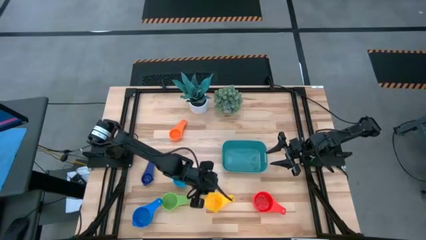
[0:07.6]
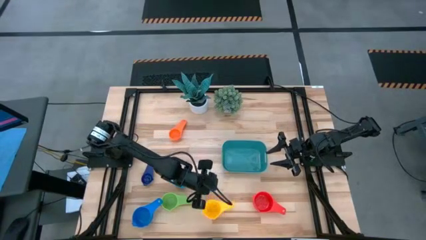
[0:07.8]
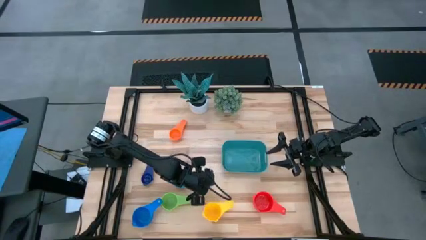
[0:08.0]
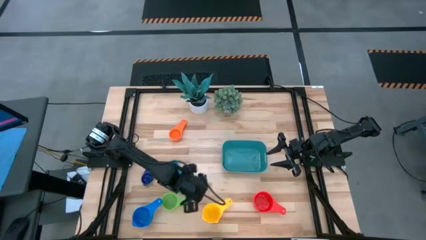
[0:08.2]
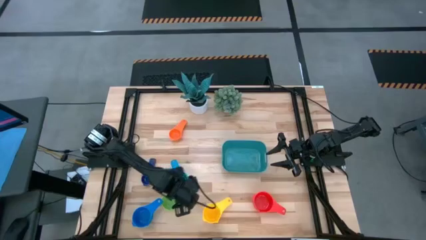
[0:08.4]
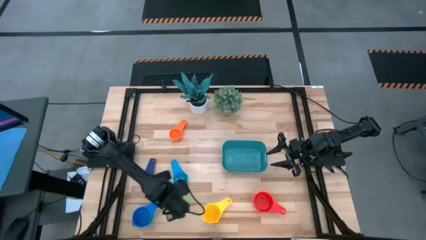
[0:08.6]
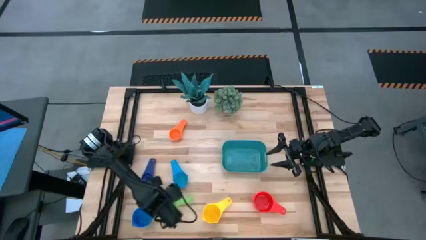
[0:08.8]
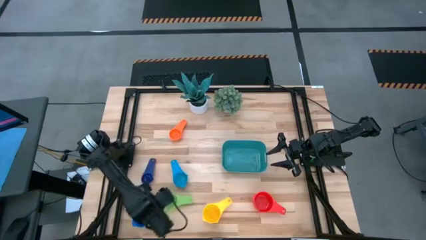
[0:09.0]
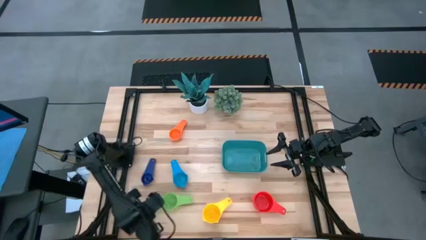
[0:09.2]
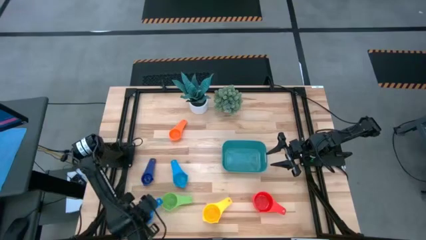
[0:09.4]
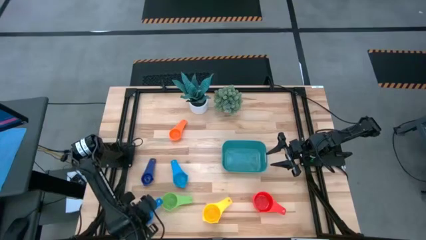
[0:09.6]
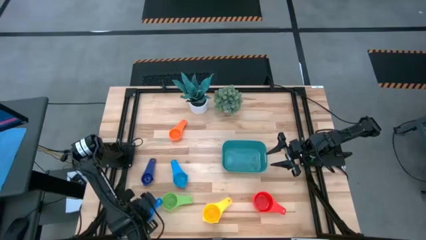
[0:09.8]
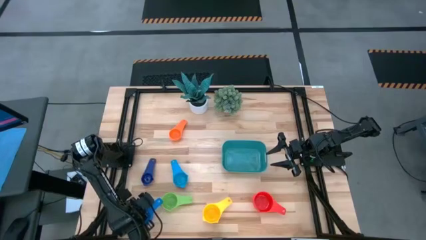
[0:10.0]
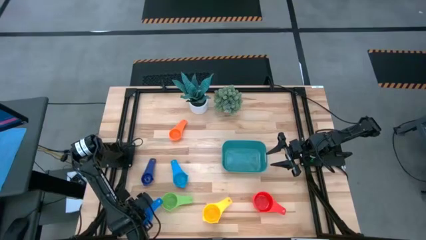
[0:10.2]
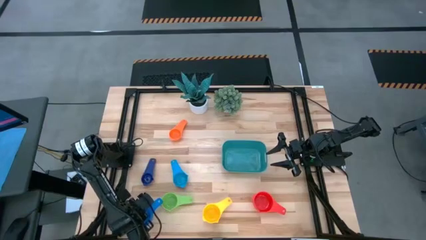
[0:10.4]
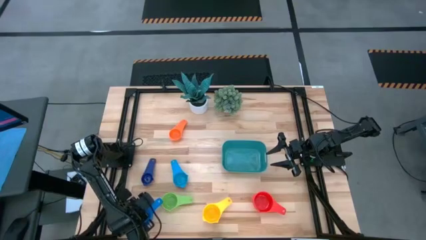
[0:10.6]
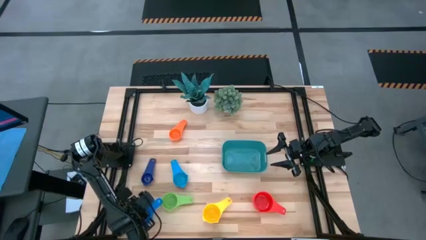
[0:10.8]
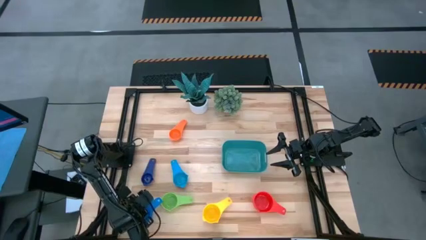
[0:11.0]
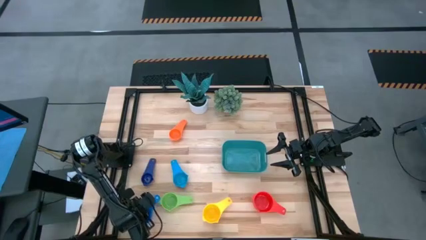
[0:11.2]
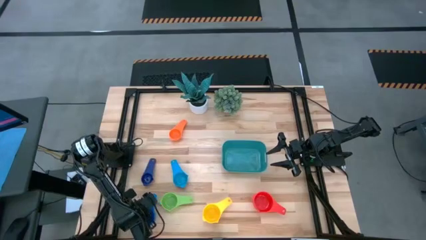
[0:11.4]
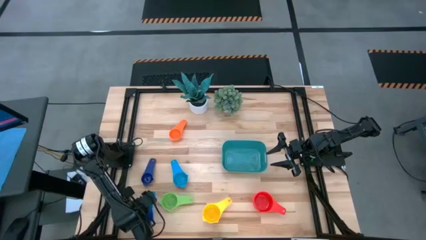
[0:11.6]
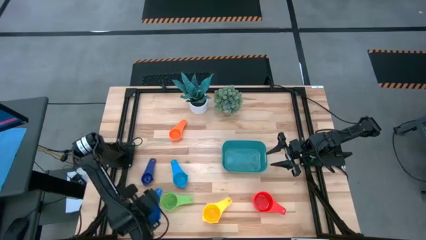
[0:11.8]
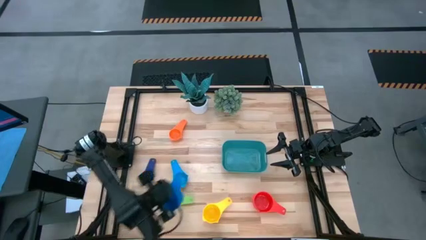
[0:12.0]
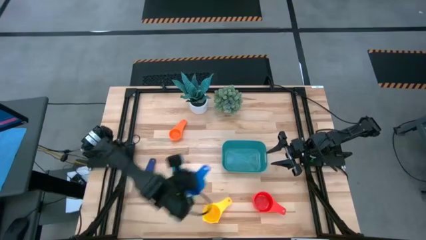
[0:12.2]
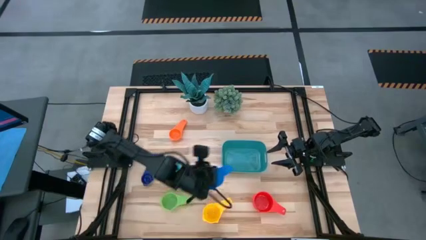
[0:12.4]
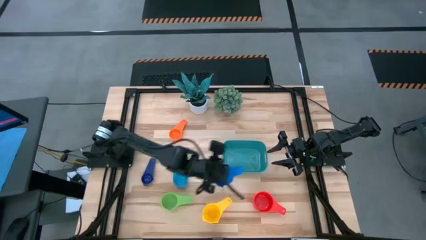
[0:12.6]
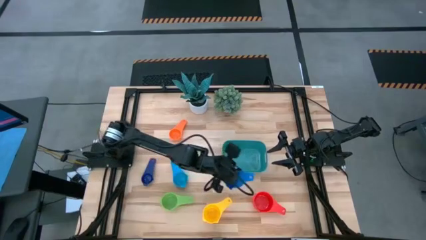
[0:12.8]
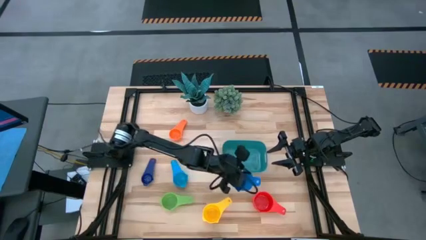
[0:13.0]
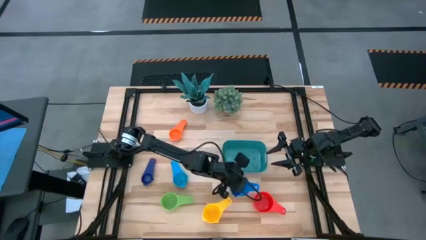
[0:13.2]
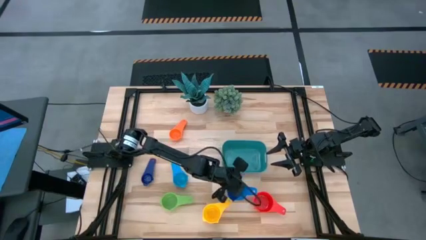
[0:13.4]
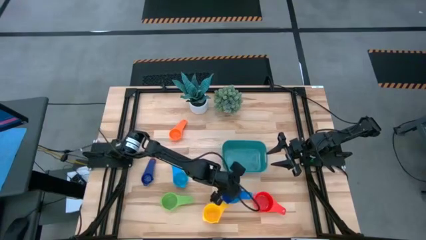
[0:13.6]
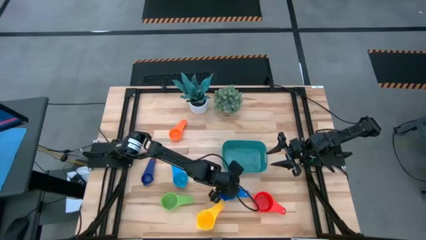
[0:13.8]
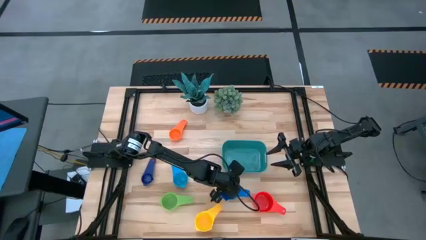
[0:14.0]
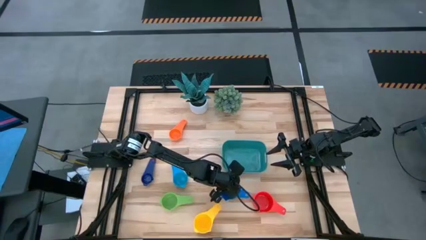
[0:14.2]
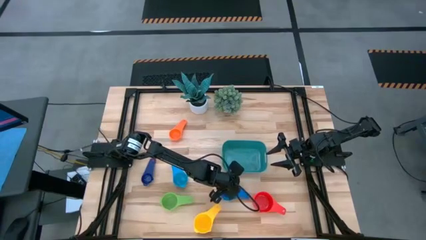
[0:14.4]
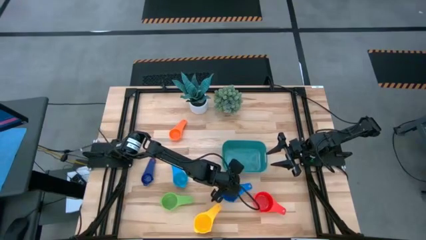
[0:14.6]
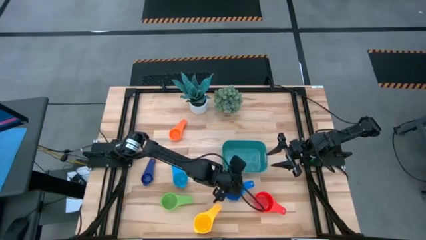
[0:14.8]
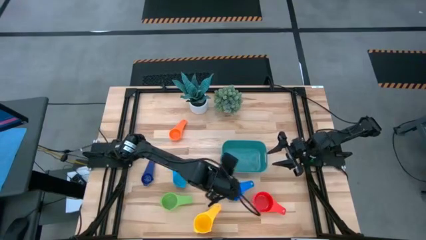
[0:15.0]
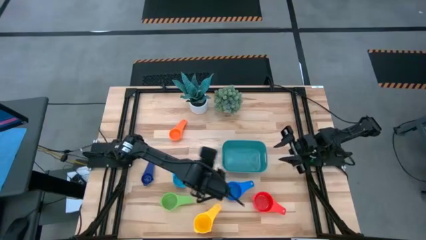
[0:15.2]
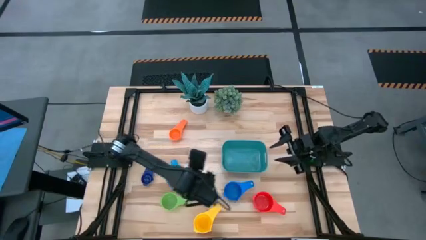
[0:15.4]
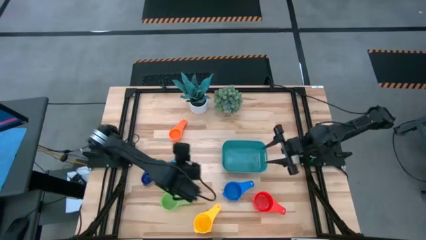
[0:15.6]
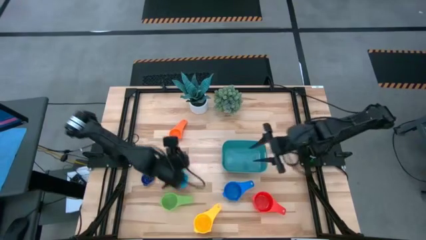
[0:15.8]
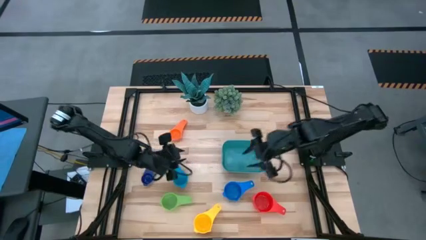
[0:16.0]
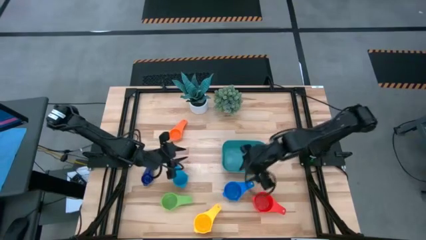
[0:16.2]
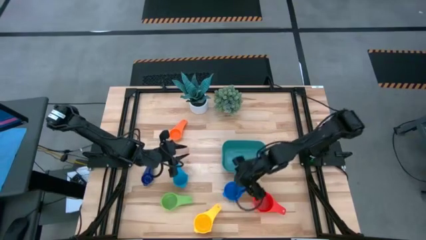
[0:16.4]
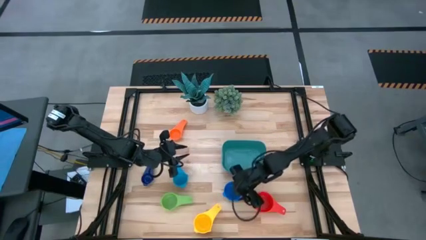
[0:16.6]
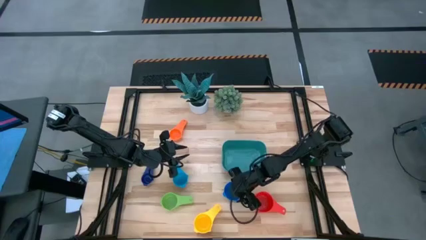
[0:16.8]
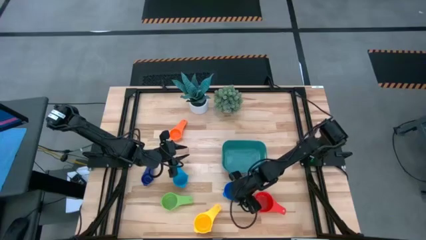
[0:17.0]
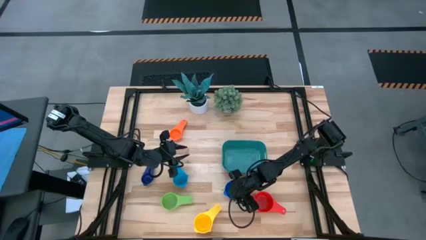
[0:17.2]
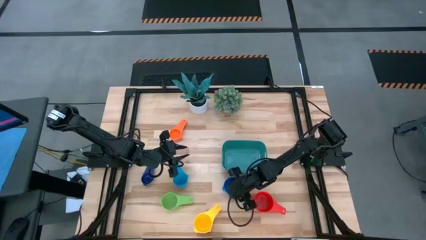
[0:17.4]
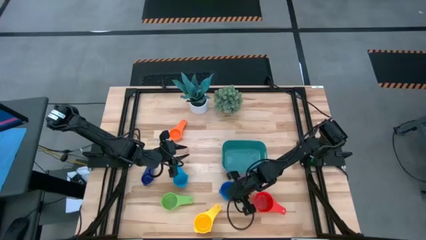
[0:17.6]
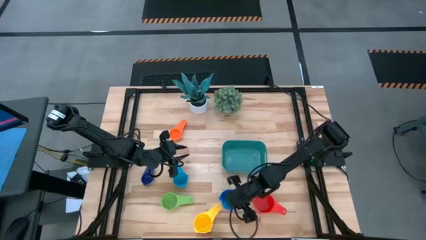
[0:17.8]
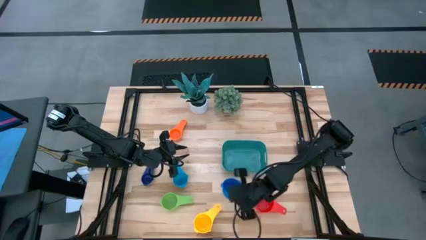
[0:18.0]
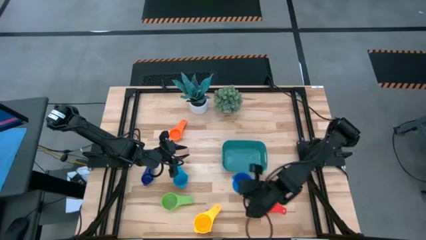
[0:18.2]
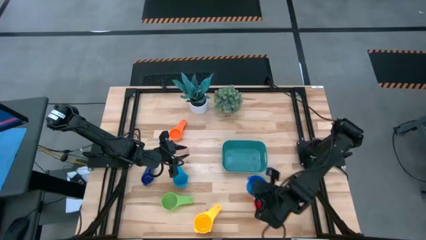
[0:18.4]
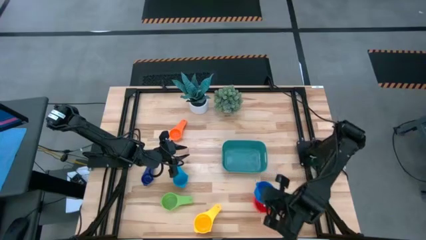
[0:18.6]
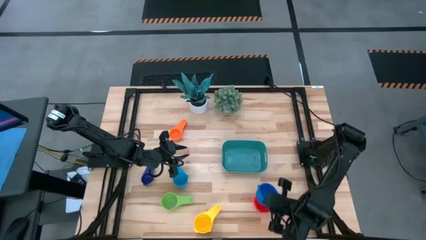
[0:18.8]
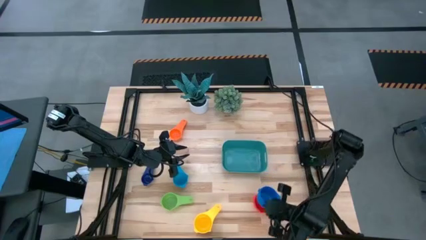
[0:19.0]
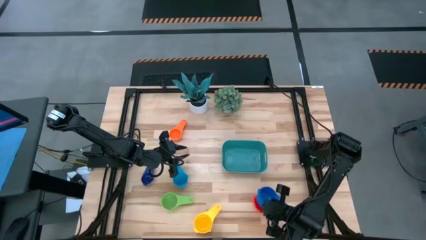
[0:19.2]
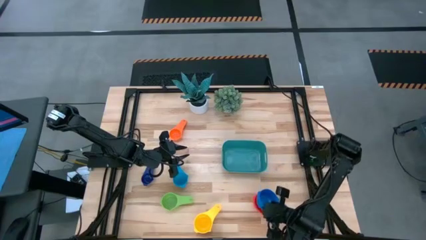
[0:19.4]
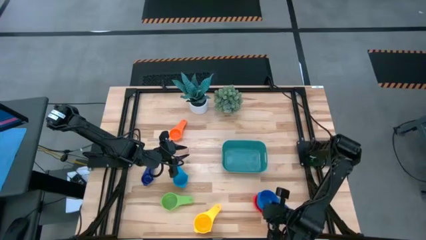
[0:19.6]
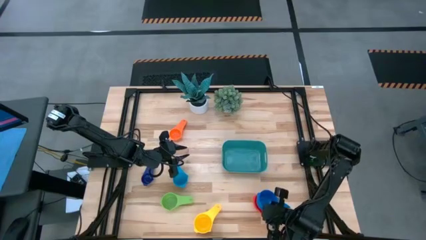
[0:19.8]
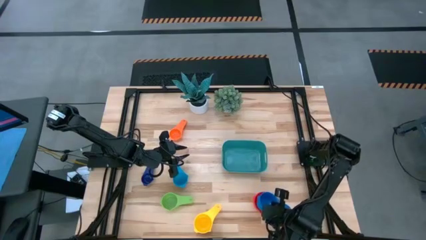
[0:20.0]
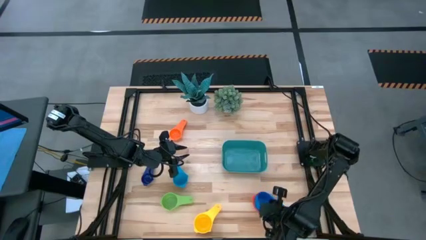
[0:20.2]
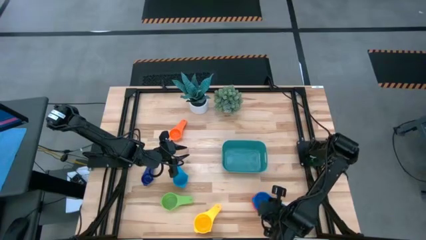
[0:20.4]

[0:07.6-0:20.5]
Task: Nest measuring cups in basket
Stack the blue measuring cup on top of the red measuring cup
